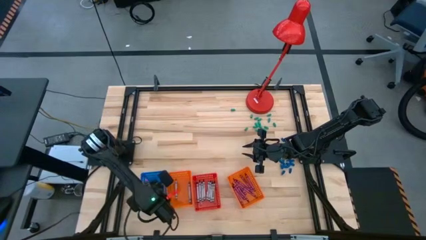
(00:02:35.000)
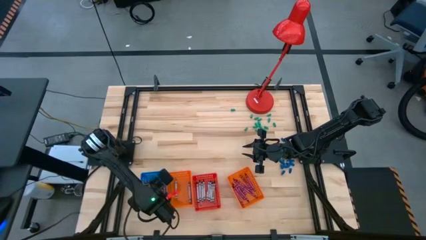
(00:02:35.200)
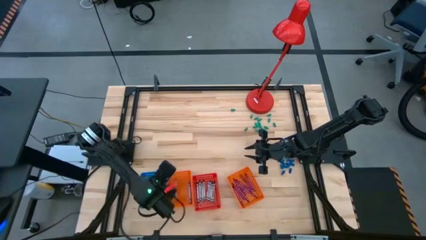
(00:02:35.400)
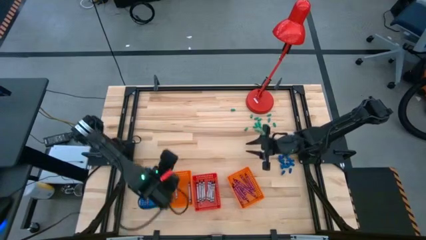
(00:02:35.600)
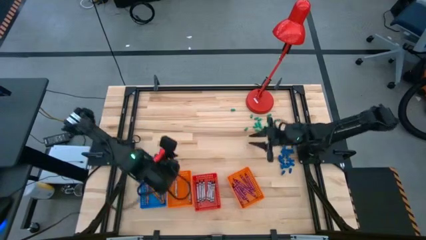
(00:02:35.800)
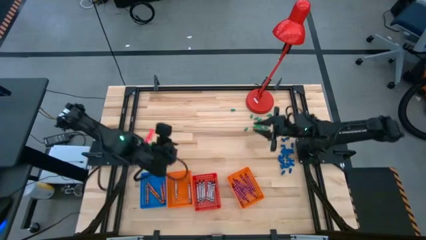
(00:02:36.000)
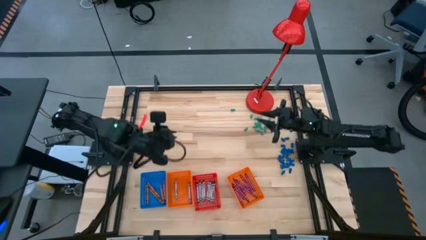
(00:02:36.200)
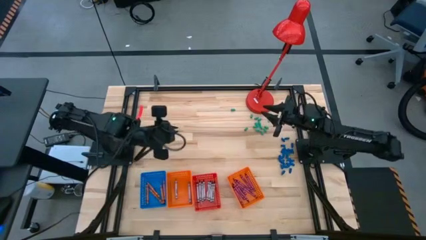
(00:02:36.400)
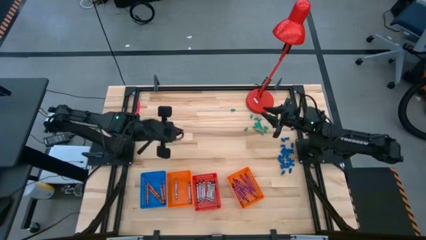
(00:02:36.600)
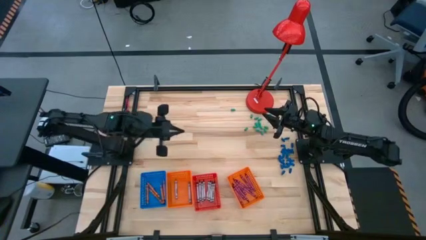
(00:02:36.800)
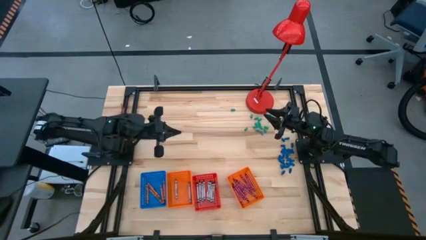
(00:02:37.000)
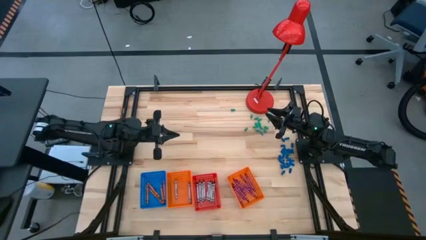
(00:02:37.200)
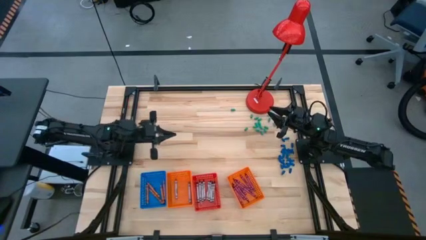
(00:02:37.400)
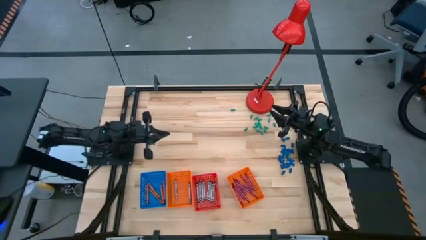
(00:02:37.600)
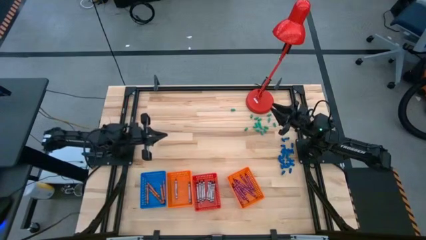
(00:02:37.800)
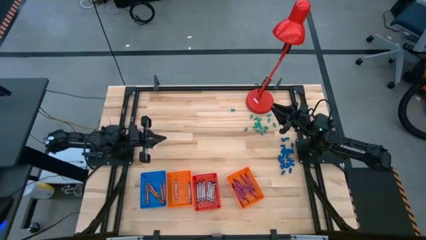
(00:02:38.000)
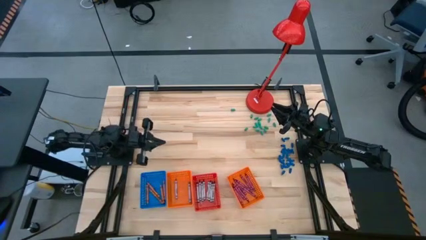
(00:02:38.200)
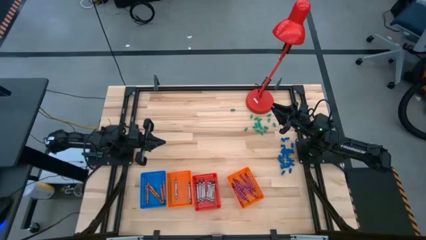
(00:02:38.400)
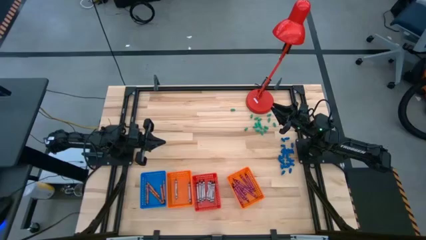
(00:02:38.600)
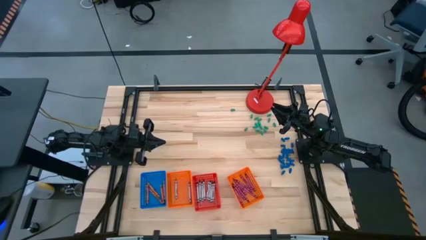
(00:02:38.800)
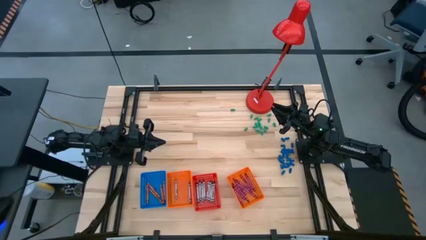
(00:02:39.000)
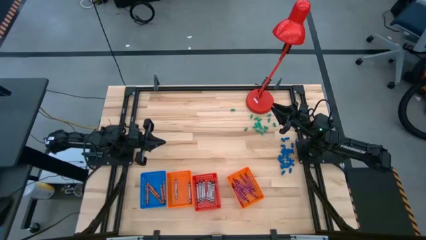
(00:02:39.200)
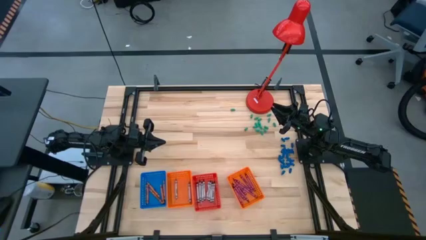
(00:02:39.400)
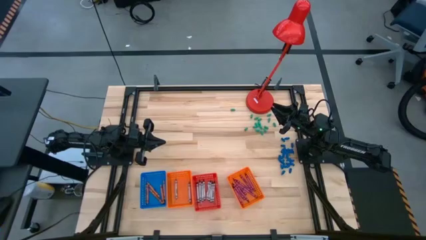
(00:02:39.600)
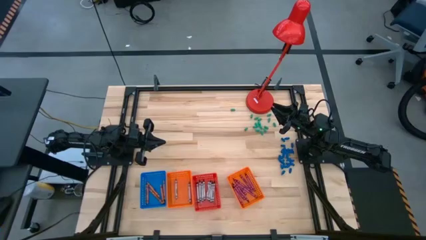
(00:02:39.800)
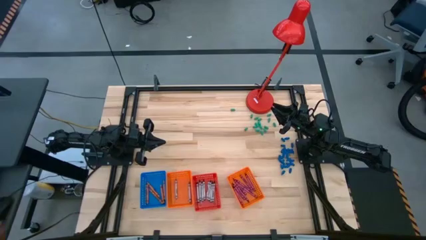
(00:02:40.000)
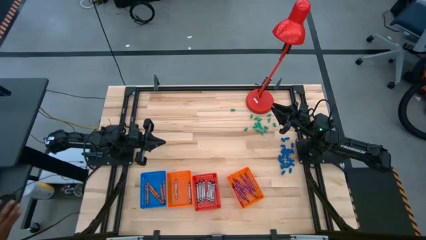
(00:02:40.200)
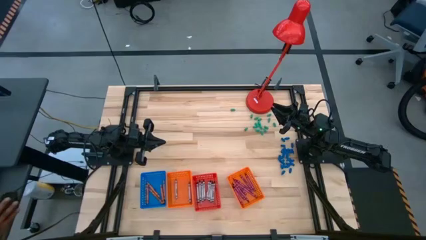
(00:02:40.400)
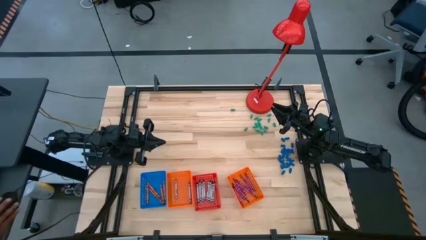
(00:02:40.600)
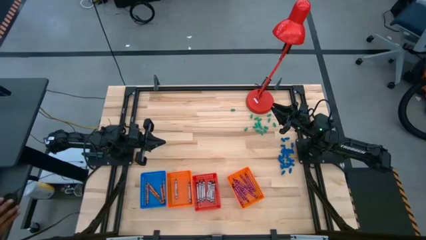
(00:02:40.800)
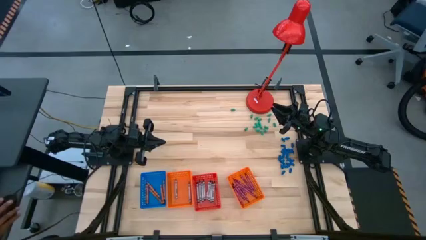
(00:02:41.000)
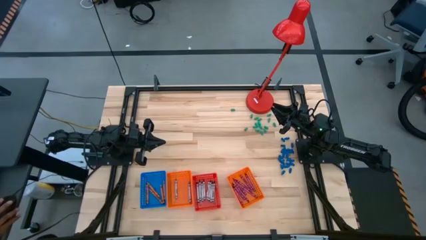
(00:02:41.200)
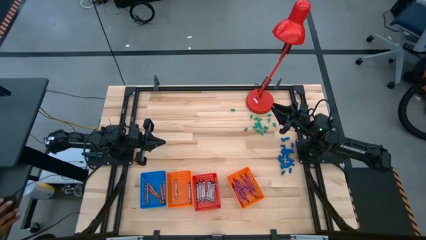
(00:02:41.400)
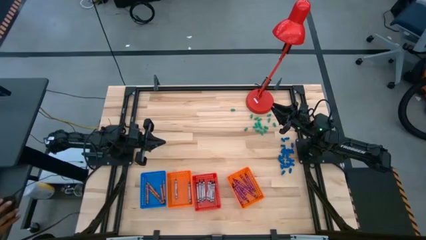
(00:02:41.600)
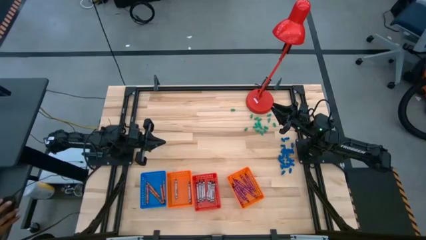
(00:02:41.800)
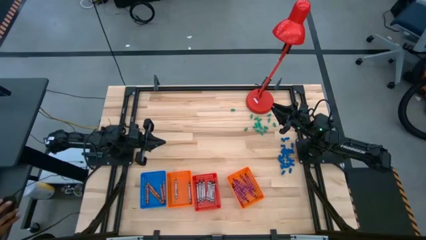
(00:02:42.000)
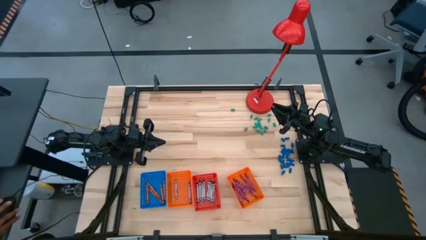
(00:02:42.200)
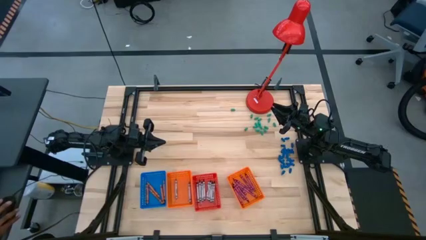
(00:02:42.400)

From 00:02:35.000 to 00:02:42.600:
Task: Sort crayons
Return to Home Position

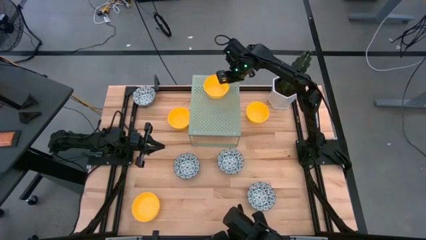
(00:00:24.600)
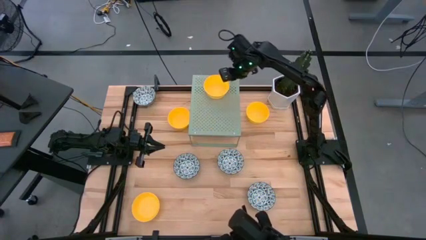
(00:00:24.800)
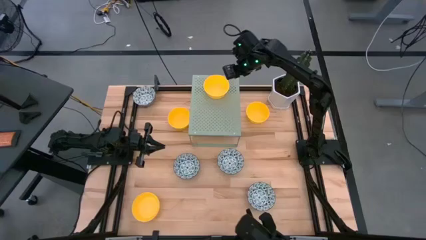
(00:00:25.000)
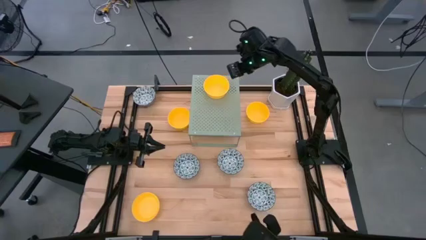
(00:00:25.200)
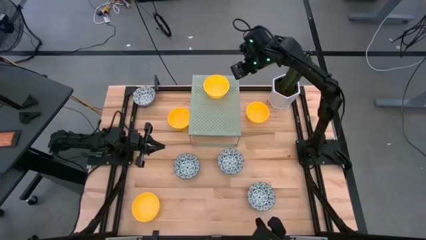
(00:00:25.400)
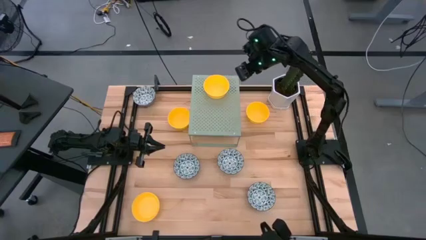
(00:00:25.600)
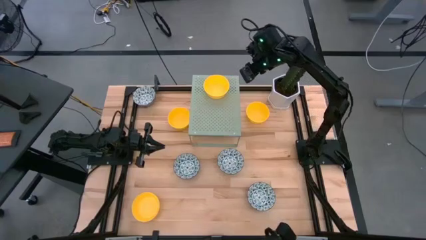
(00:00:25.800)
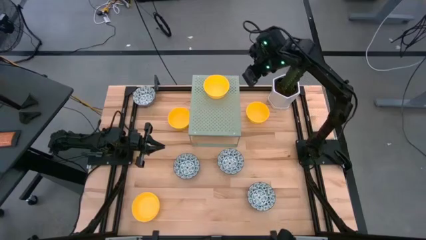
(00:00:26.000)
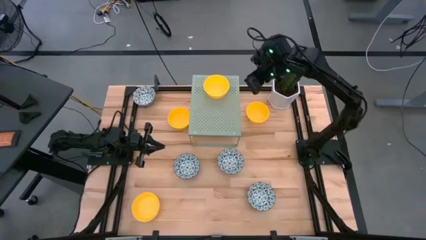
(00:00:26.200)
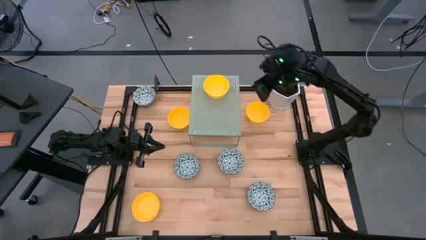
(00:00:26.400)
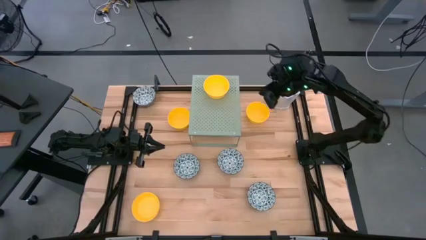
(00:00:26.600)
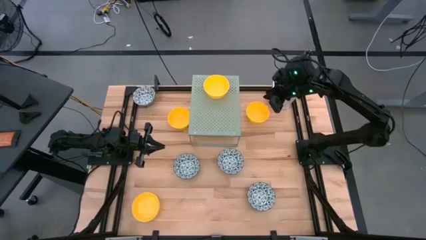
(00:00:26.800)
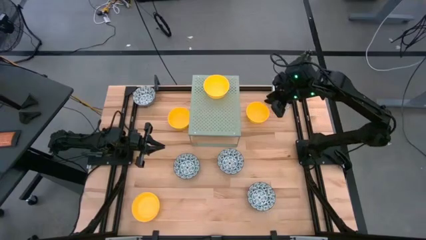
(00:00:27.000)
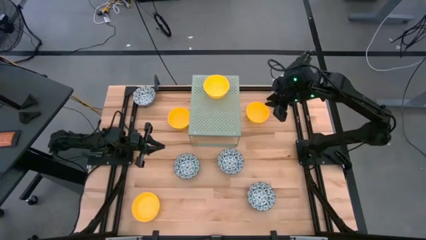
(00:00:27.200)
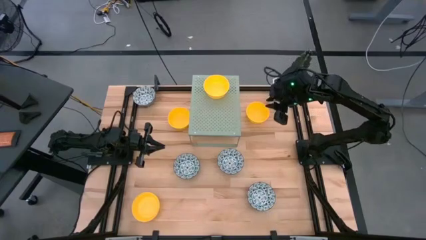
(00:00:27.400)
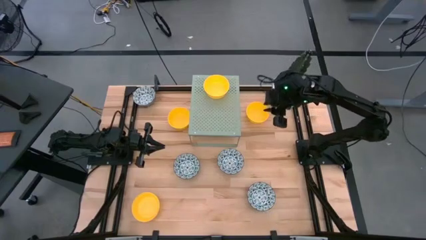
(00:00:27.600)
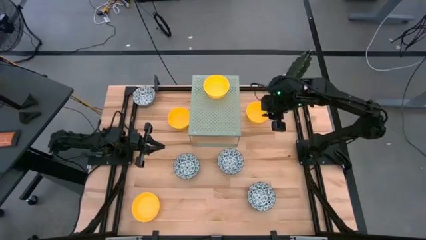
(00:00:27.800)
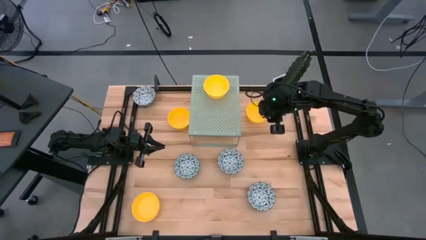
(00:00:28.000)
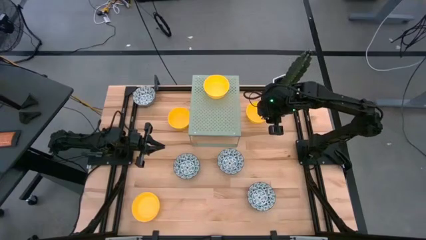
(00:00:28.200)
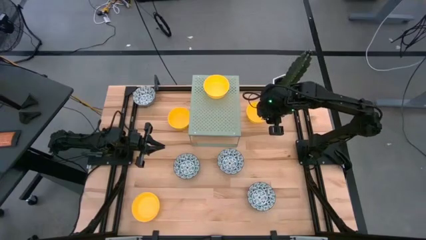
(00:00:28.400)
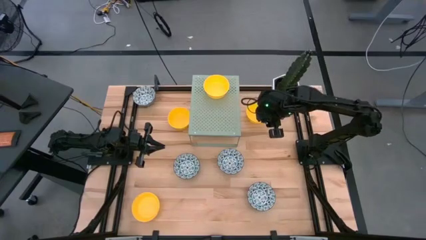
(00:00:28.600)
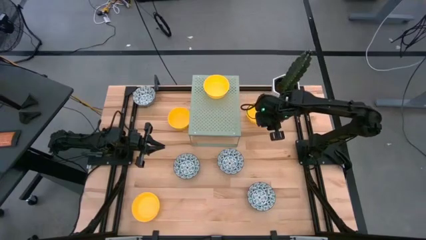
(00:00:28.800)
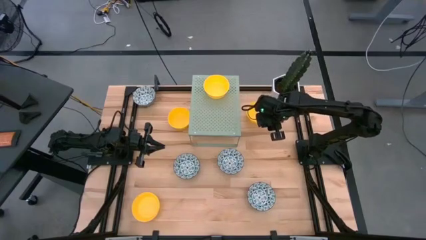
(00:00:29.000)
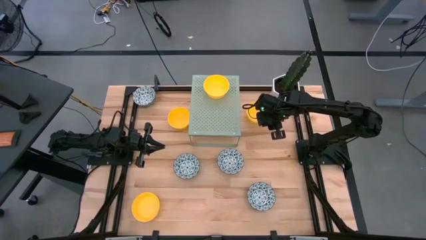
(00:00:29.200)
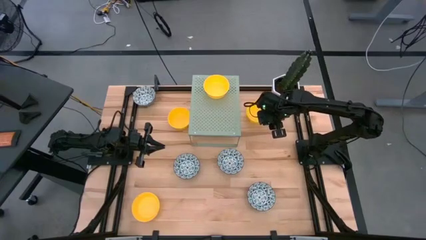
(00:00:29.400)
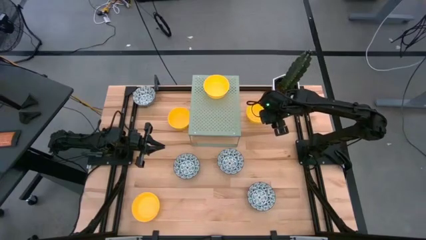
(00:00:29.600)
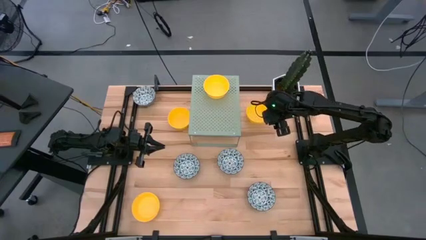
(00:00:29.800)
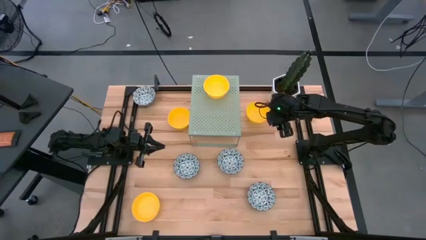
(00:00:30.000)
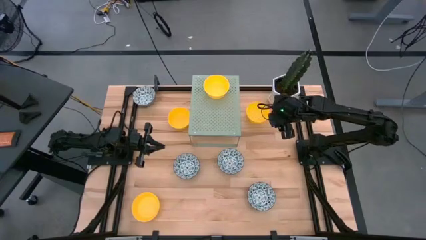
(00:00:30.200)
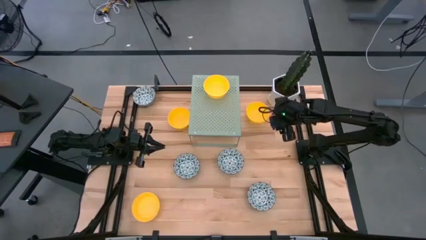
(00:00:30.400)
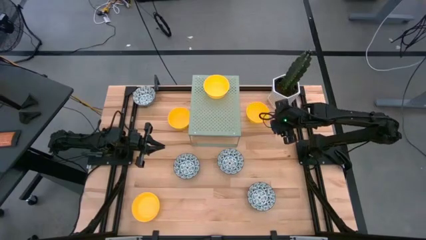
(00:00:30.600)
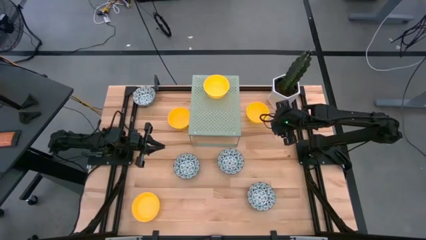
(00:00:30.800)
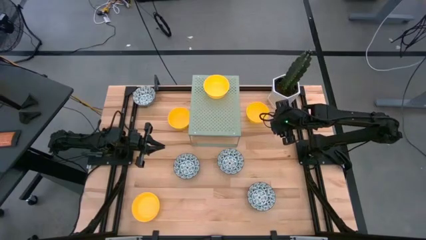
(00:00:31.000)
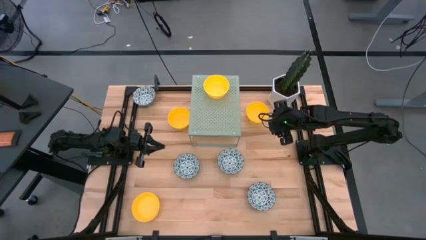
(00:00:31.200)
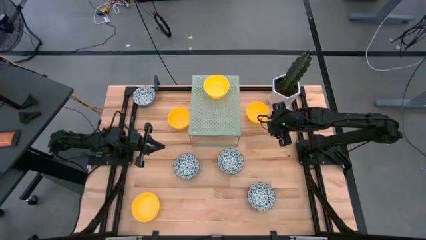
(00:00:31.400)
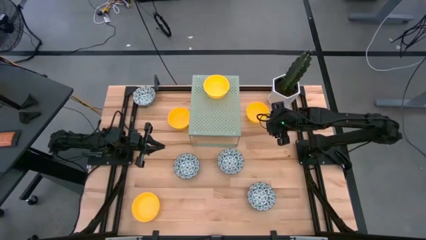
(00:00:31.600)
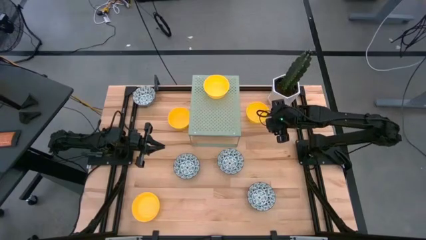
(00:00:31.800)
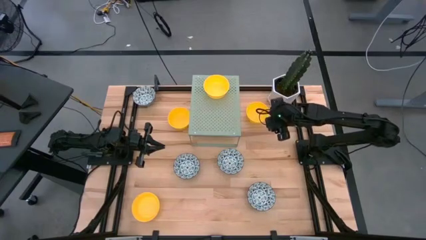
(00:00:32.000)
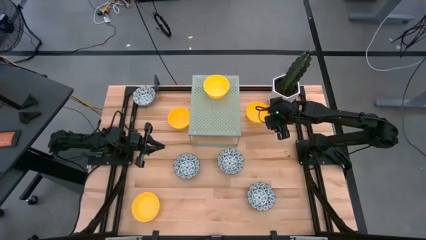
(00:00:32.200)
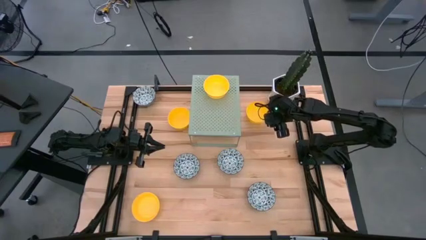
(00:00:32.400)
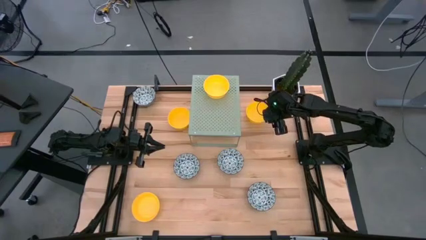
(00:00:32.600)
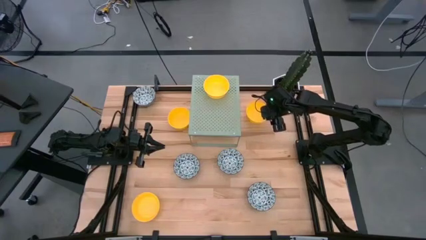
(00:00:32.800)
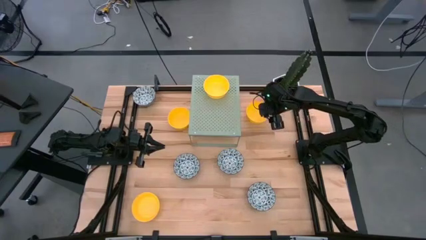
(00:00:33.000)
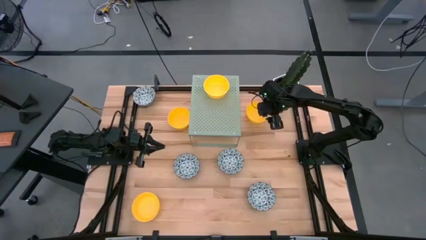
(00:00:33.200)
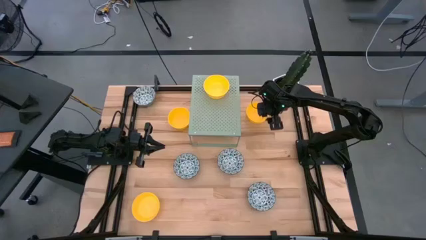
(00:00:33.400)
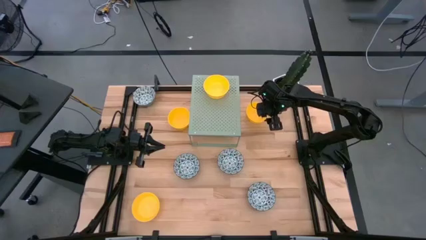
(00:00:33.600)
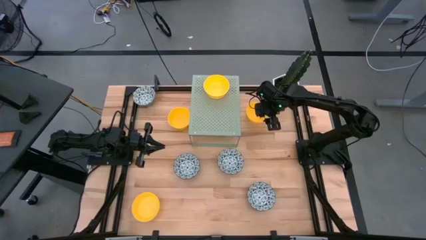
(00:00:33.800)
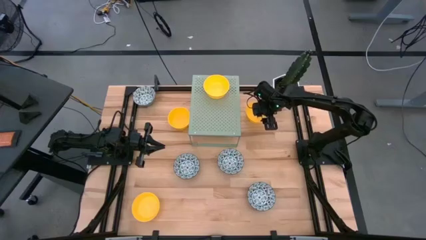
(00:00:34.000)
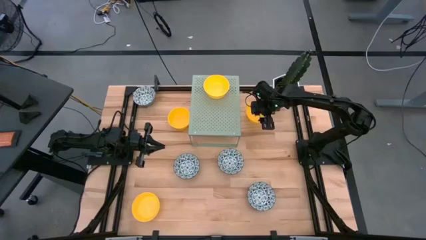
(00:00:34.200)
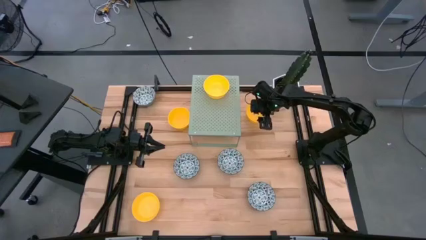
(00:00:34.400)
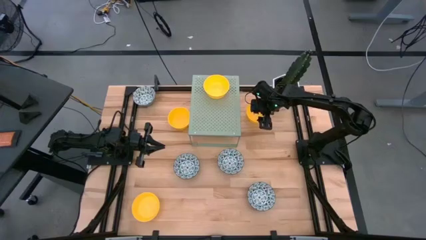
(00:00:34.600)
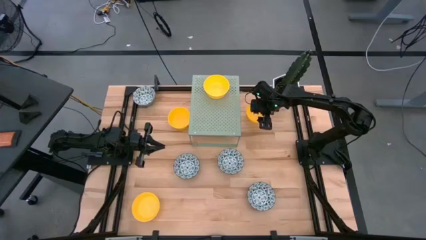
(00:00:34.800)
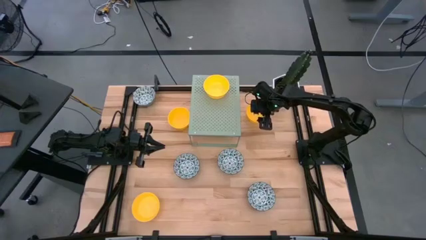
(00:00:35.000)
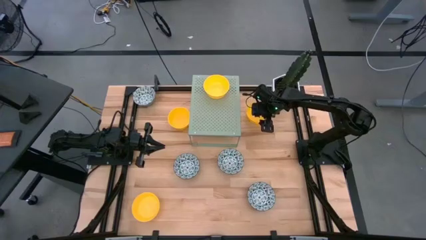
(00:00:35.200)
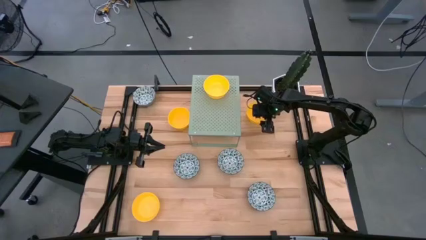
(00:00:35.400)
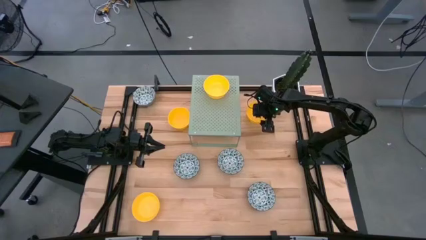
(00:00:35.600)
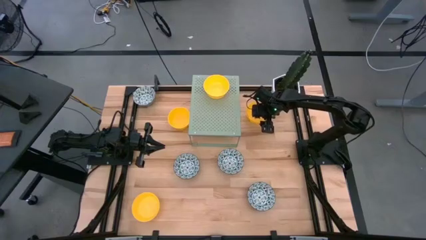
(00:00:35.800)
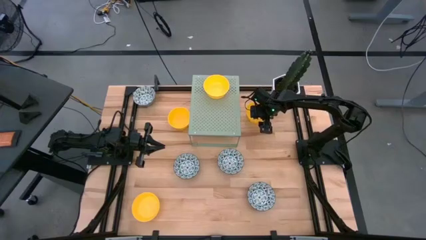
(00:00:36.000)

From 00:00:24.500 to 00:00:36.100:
Task: Pick & Place Mini bowls
Stack the yellow bowl on top of the other yellow bowl on the shelf
